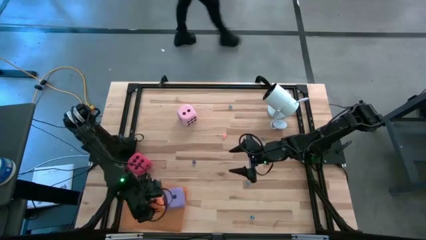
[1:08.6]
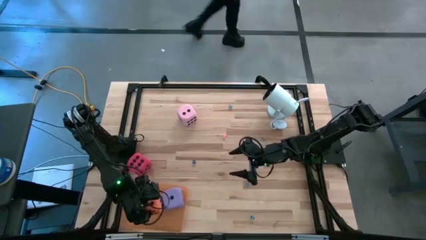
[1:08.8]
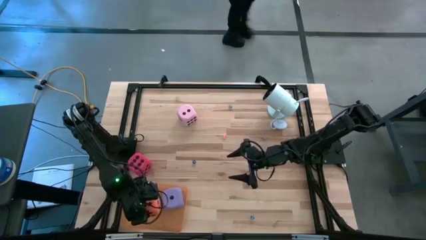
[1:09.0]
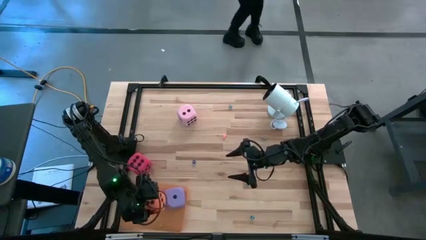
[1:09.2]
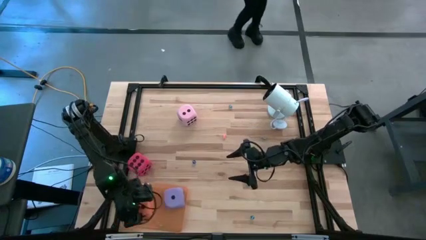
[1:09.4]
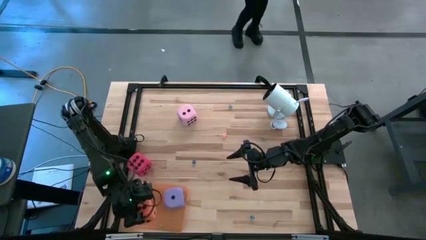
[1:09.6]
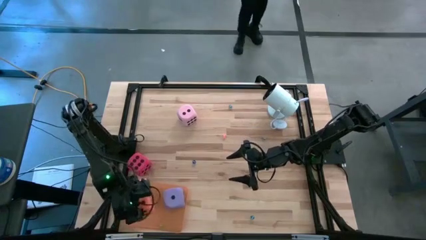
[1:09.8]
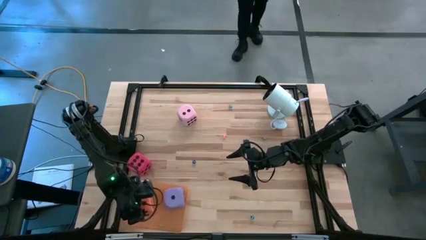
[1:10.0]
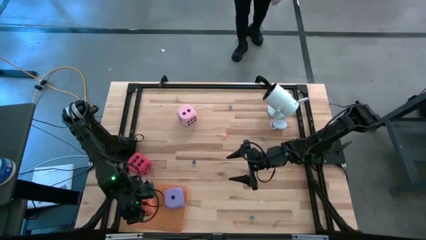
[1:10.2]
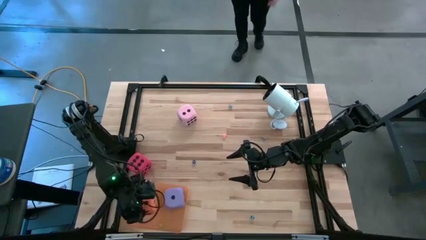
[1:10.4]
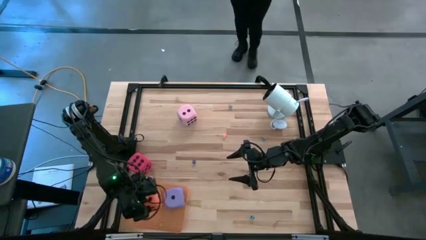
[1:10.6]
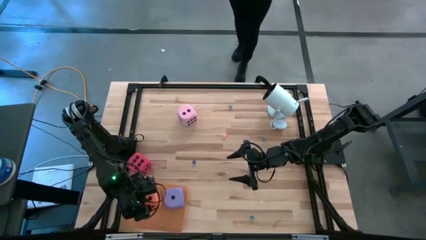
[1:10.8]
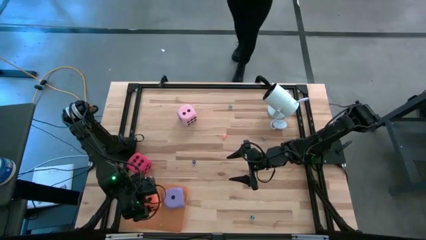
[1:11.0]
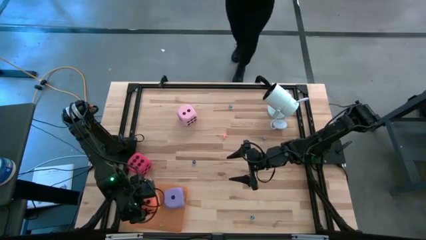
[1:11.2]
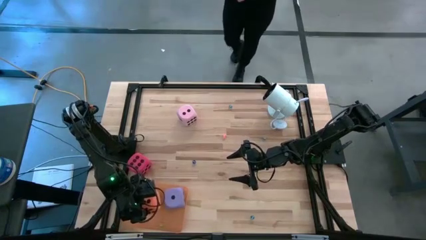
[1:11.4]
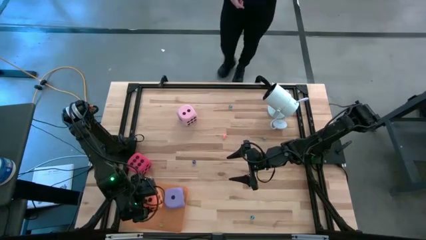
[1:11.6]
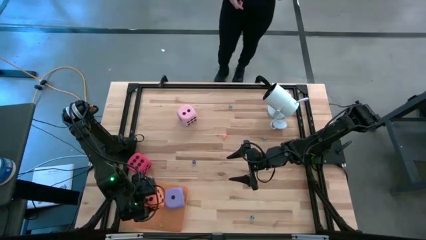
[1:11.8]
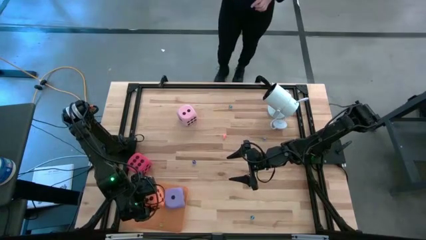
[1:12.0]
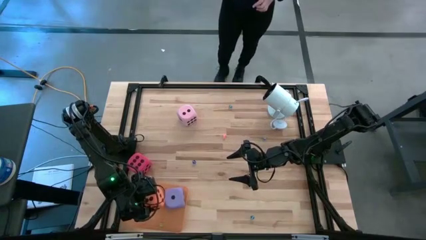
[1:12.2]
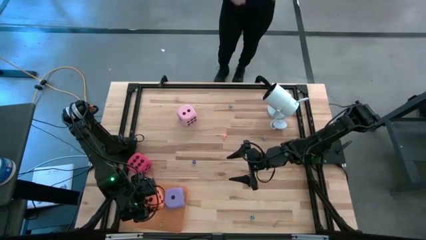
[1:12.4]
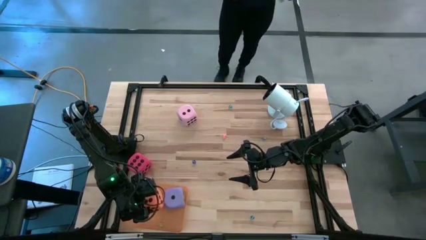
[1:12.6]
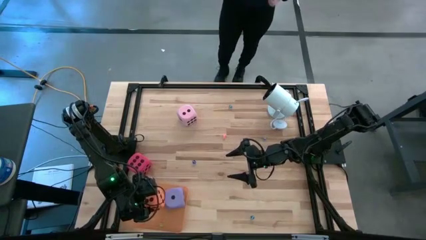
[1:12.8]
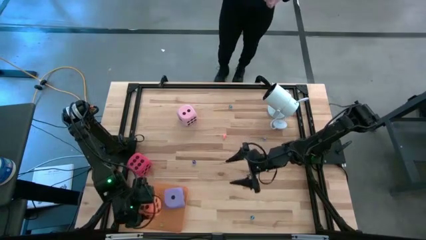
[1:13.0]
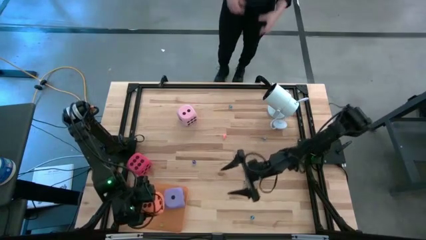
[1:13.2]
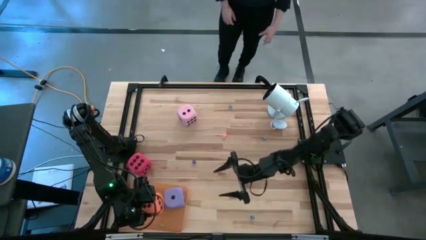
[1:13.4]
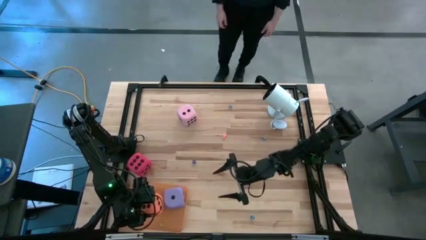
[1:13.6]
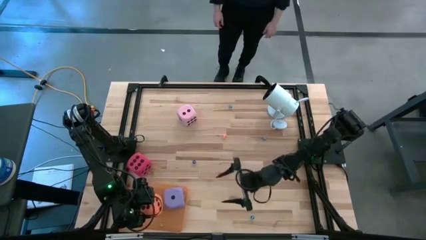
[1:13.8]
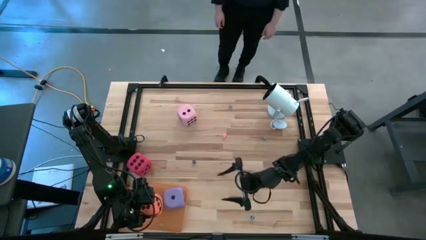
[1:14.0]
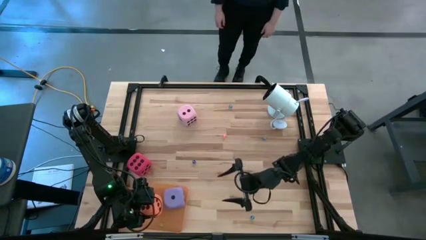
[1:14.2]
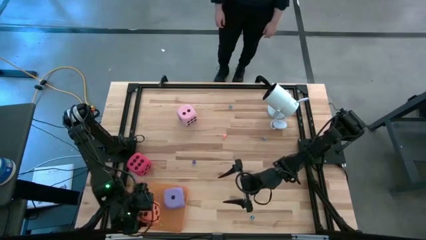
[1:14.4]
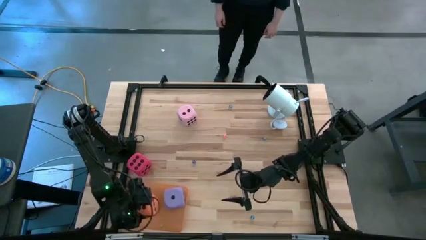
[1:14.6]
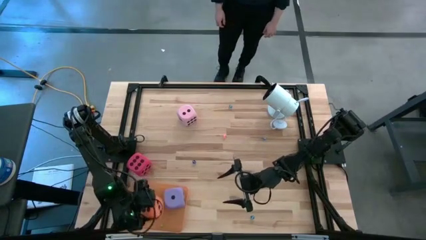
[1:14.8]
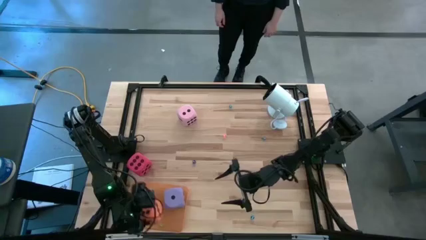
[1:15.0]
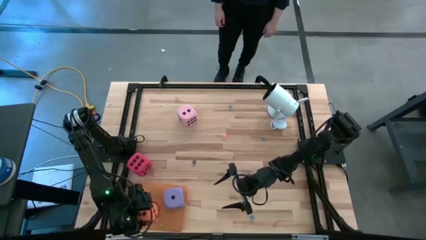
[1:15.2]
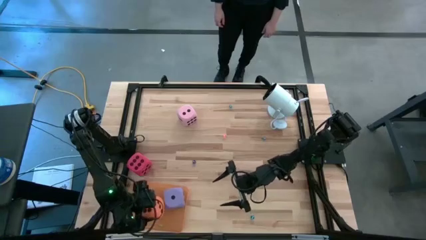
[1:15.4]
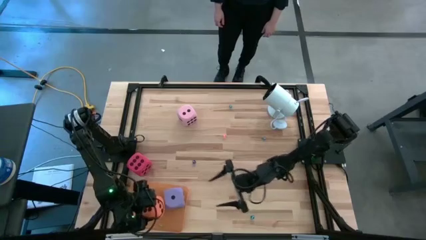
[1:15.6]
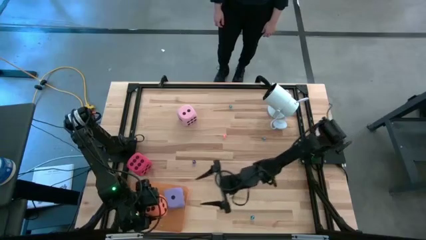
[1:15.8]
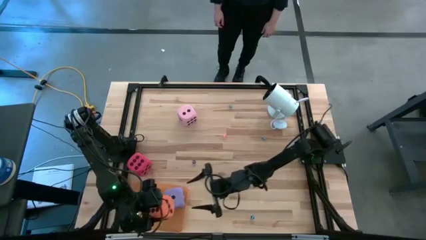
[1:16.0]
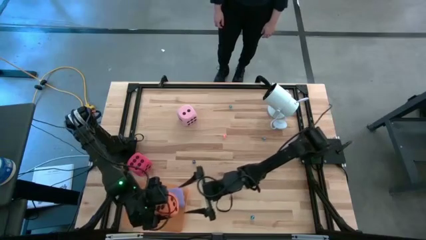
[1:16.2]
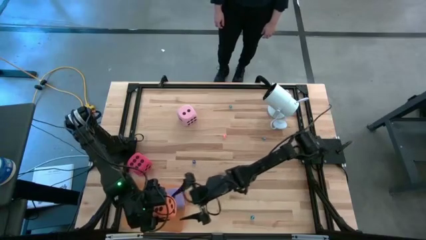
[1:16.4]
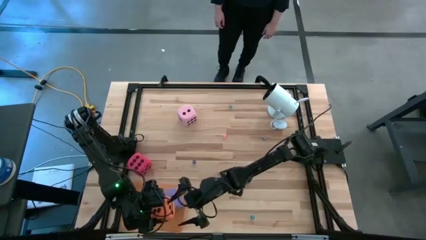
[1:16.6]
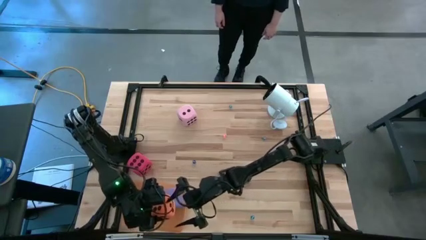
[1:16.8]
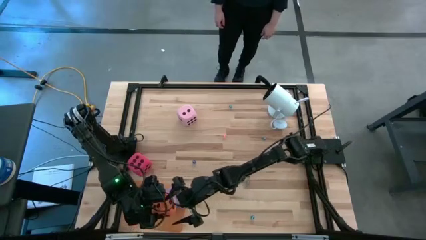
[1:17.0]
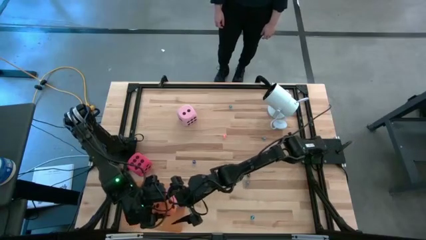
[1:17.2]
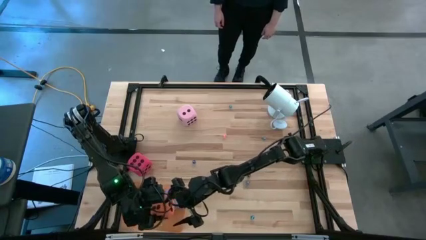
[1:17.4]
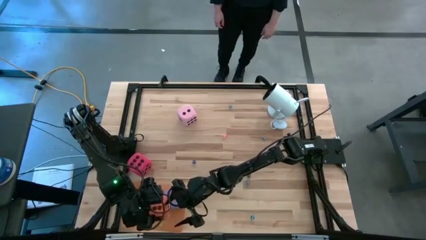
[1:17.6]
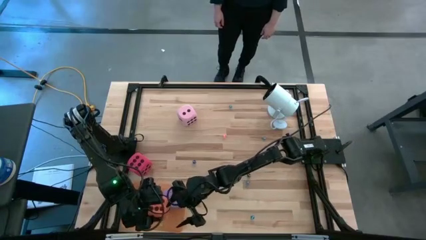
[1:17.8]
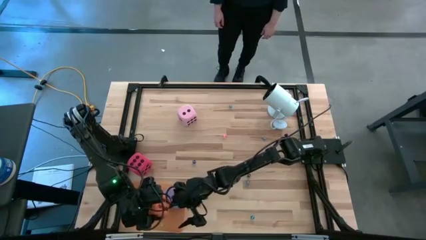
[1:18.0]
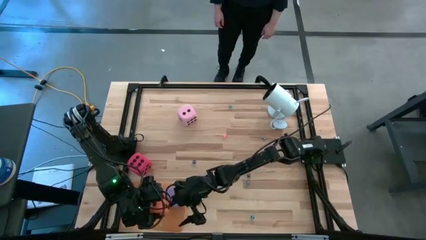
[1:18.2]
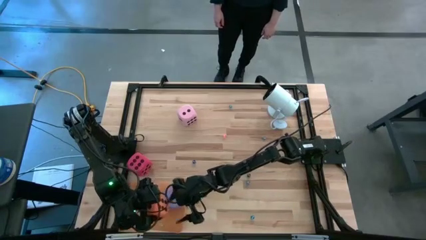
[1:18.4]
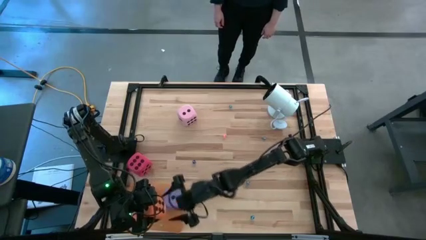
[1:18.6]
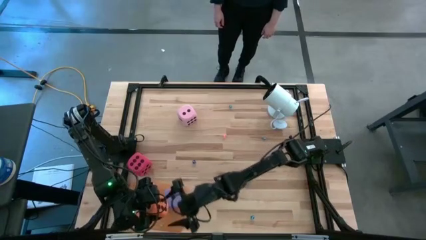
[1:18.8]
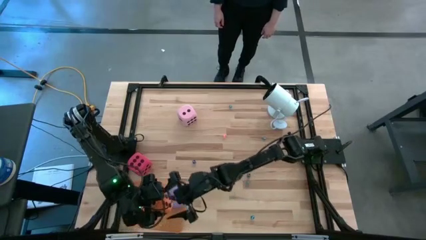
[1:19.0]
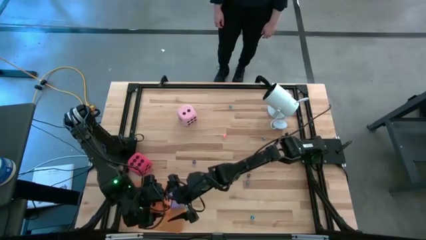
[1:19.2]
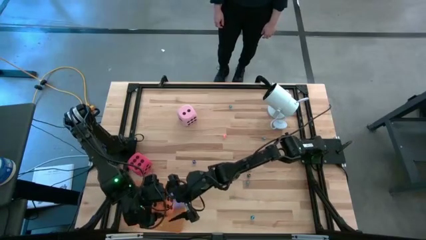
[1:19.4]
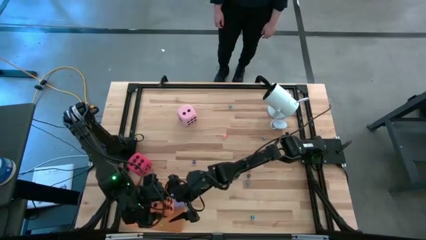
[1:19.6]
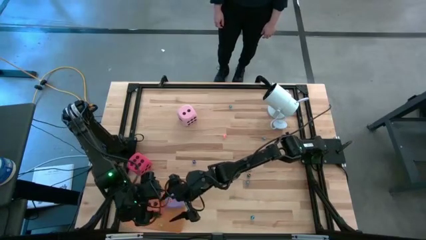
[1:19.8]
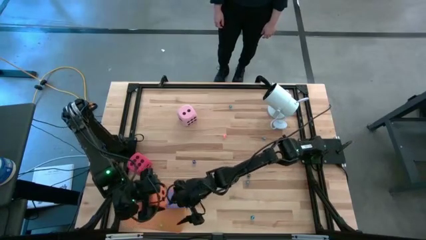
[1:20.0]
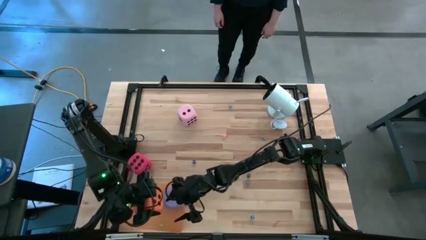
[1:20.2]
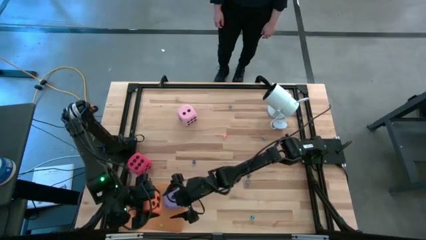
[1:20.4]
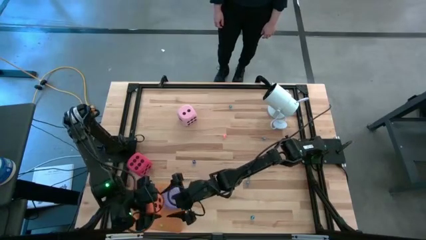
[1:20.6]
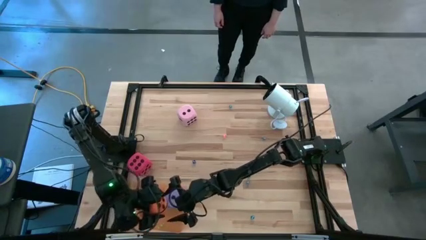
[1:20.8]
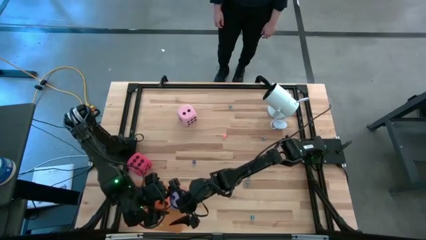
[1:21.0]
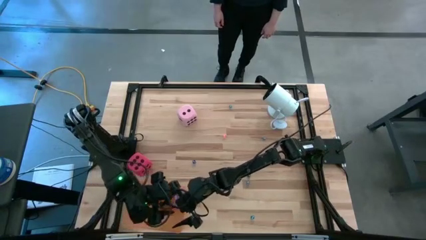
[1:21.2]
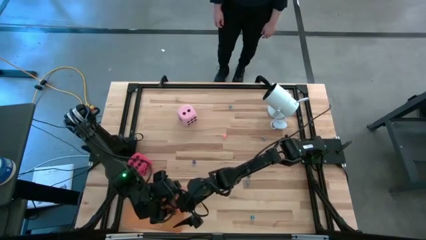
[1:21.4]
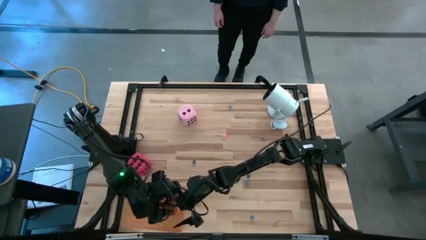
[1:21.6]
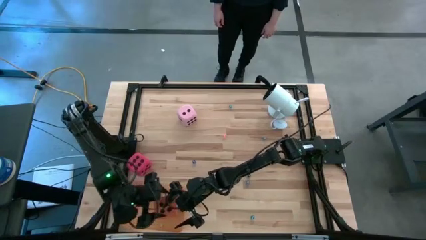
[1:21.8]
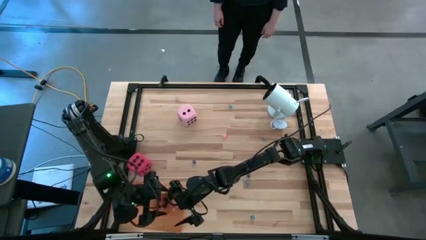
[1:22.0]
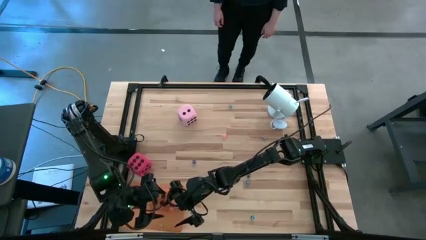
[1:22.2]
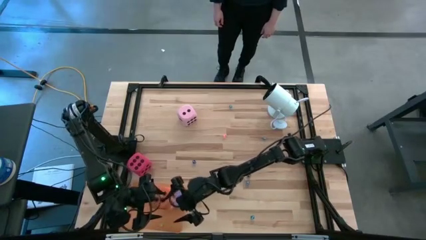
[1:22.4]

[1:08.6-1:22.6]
Task: Pick & Place Dice
Put the large orange dice into the orange bin

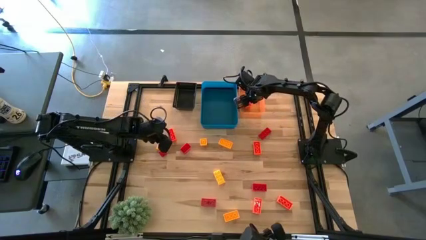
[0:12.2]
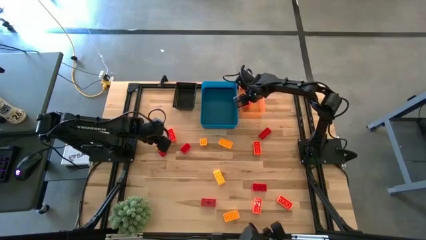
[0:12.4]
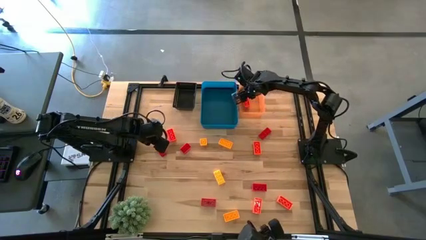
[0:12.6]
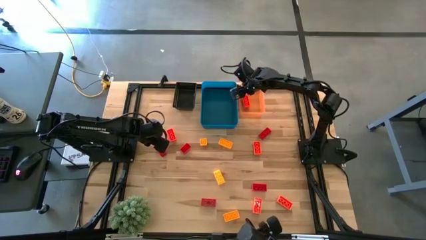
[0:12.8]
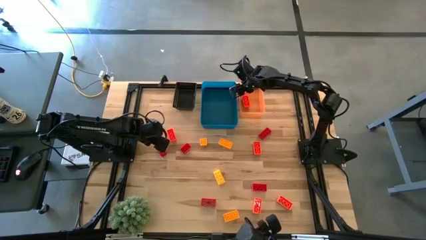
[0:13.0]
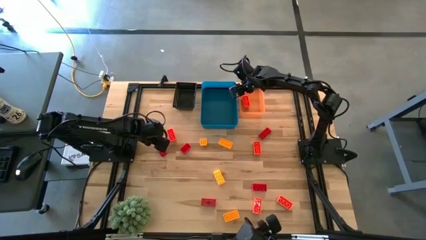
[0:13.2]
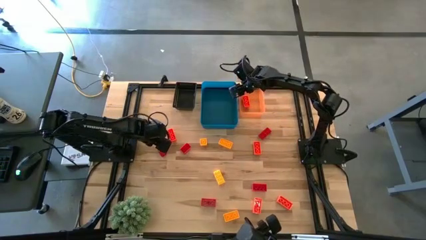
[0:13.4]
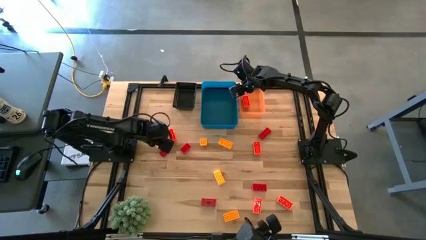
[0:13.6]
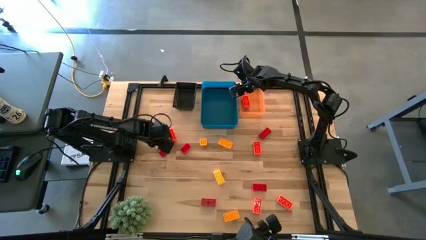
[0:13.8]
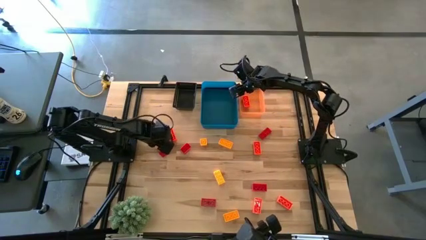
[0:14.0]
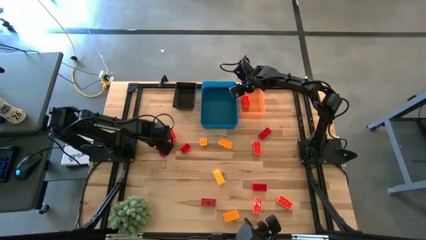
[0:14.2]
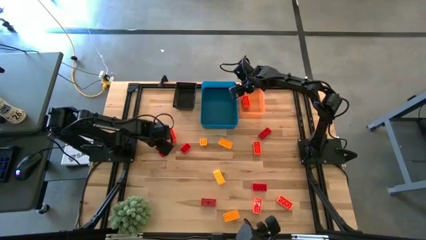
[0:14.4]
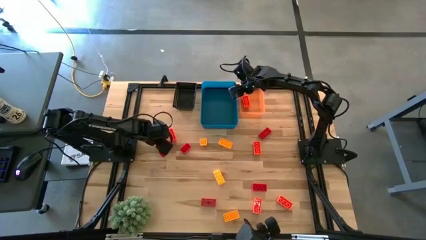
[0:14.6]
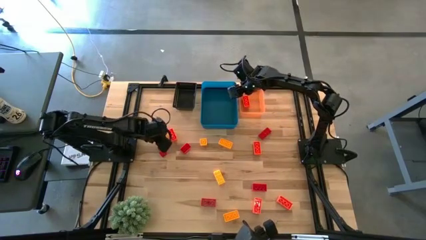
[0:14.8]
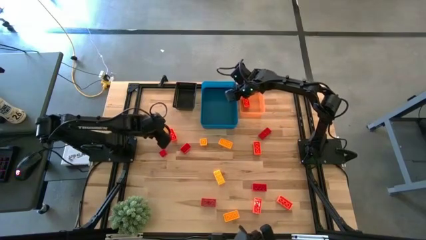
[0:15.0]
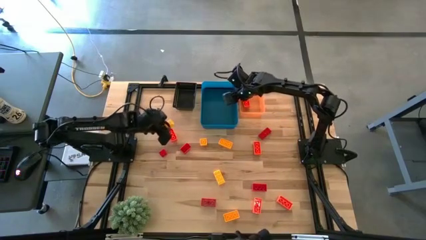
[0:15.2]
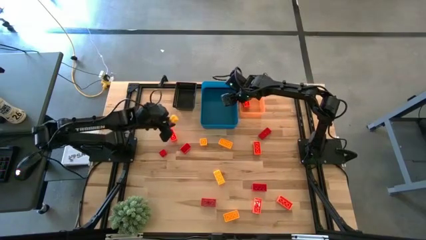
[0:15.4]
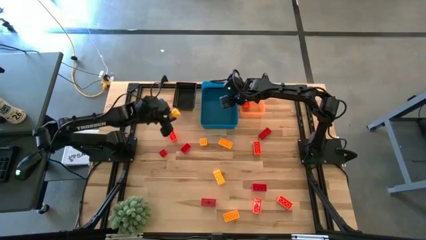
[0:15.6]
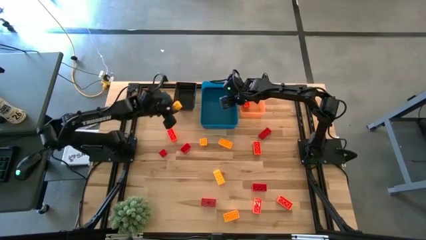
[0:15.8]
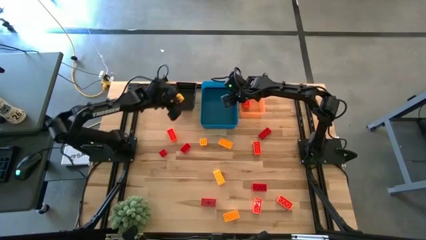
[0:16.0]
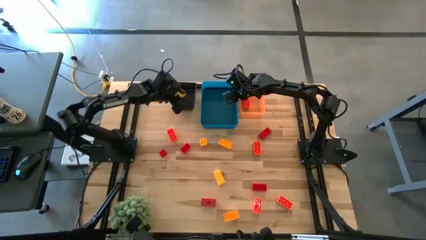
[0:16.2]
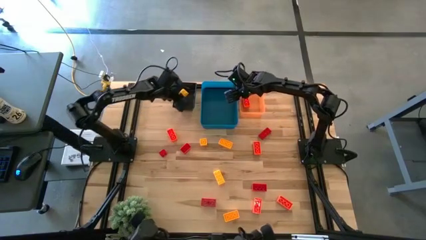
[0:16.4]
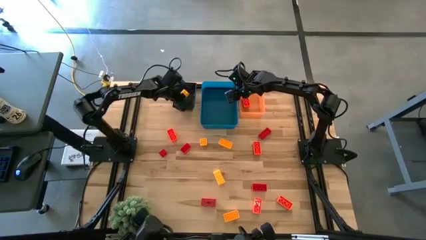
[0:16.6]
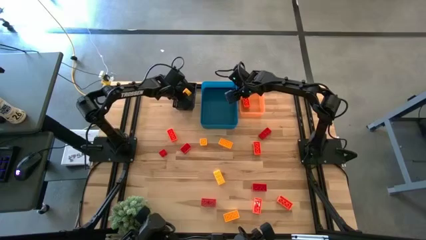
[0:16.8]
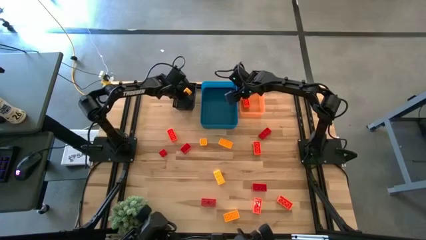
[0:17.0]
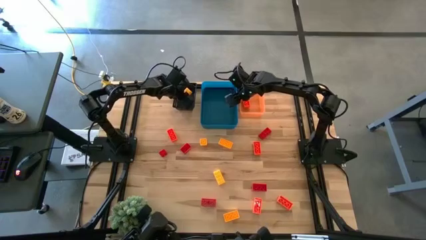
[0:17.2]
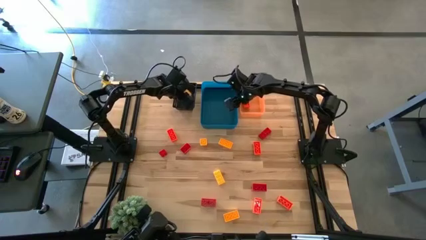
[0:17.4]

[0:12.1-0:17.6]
Task: Sort & place blocks by color
Put the yellow game piece into the black bin
